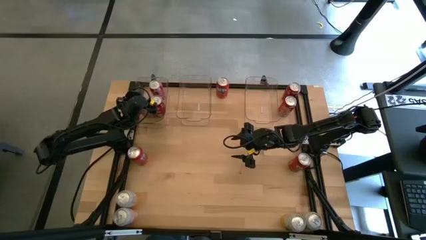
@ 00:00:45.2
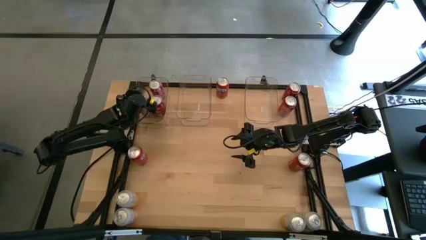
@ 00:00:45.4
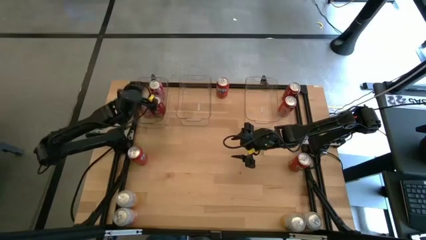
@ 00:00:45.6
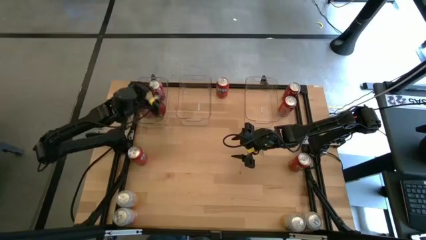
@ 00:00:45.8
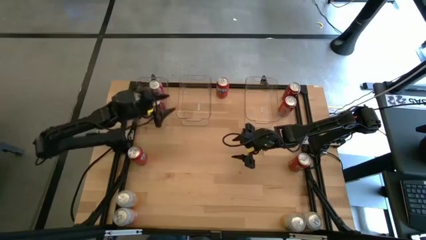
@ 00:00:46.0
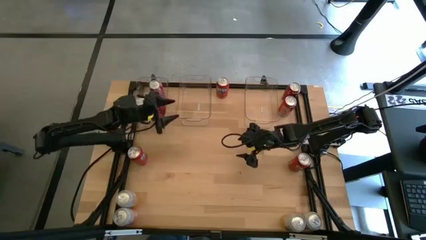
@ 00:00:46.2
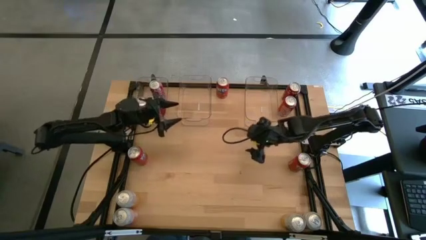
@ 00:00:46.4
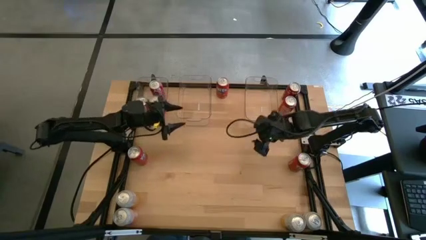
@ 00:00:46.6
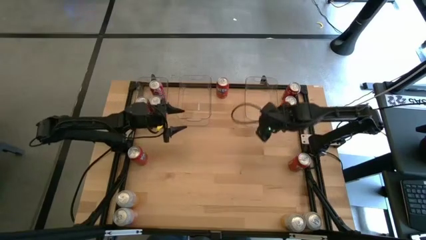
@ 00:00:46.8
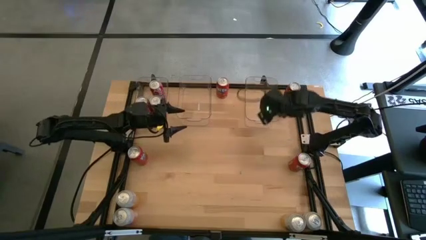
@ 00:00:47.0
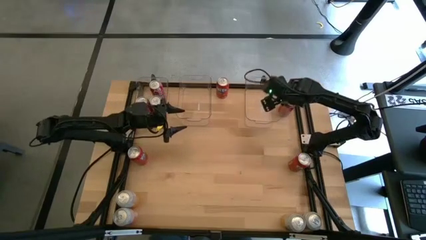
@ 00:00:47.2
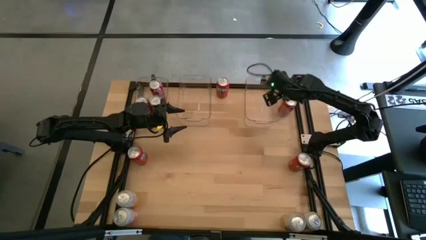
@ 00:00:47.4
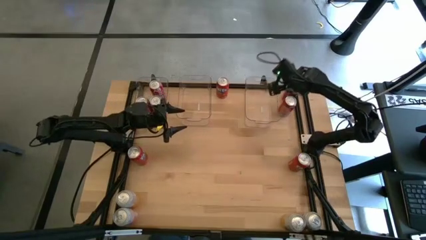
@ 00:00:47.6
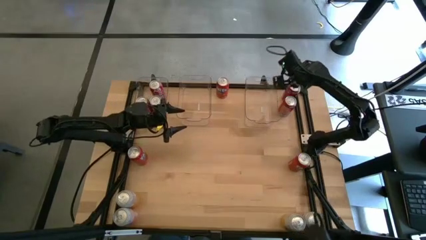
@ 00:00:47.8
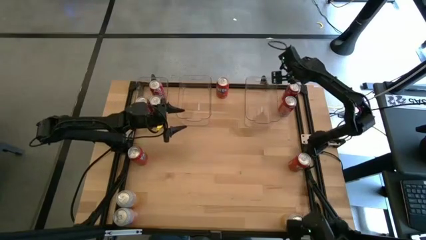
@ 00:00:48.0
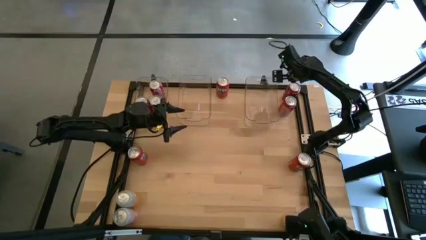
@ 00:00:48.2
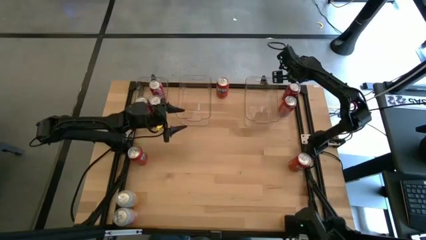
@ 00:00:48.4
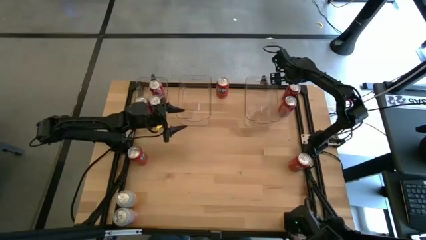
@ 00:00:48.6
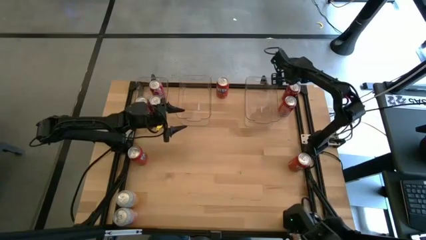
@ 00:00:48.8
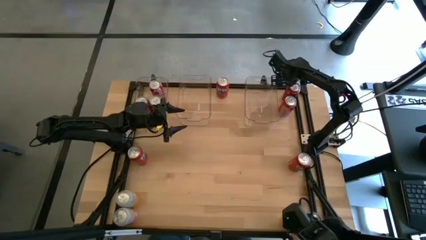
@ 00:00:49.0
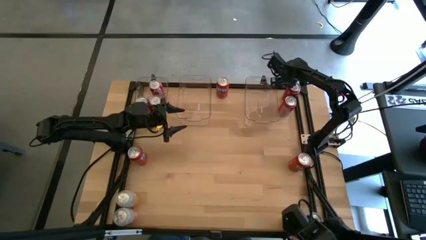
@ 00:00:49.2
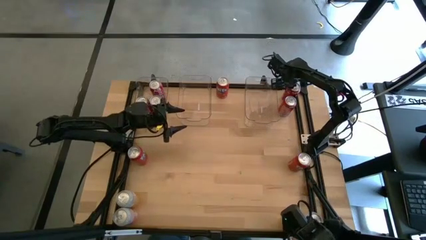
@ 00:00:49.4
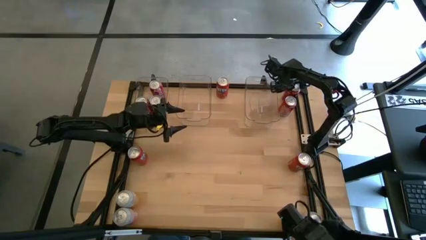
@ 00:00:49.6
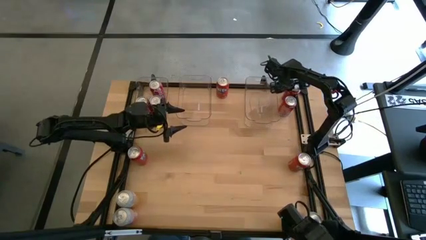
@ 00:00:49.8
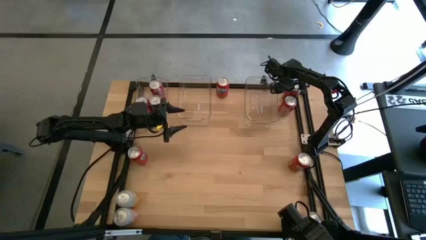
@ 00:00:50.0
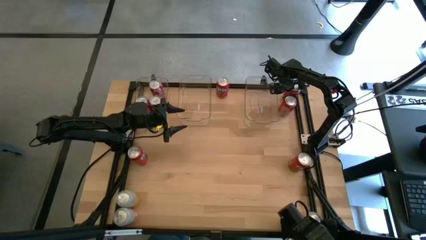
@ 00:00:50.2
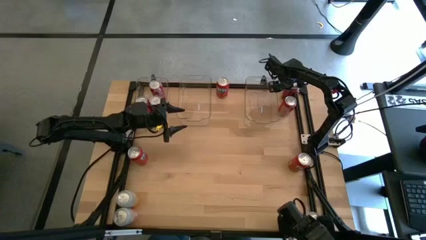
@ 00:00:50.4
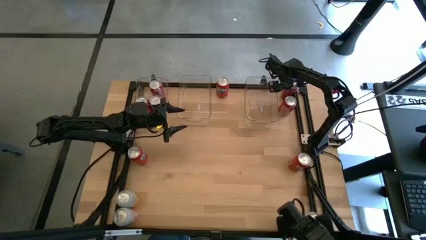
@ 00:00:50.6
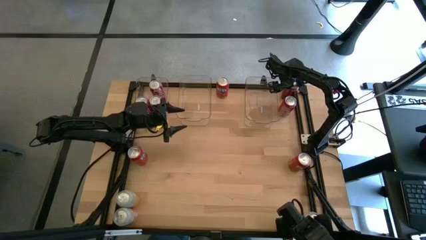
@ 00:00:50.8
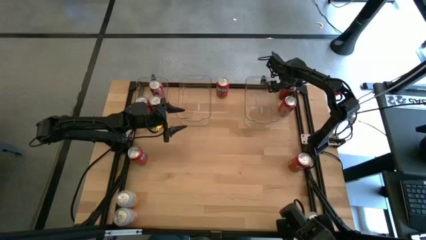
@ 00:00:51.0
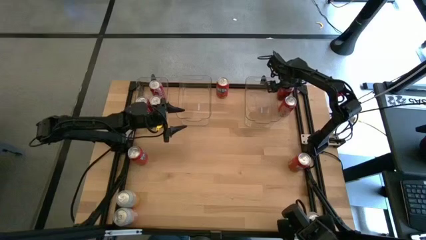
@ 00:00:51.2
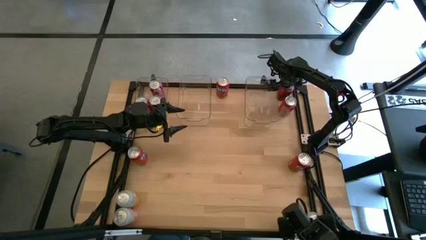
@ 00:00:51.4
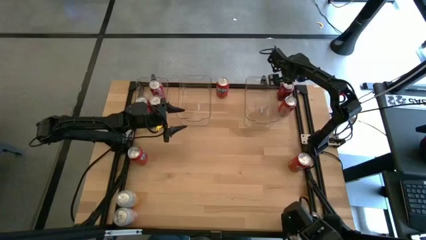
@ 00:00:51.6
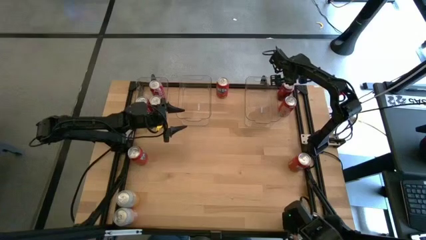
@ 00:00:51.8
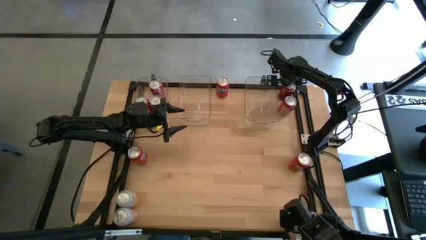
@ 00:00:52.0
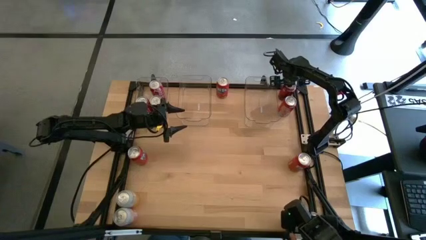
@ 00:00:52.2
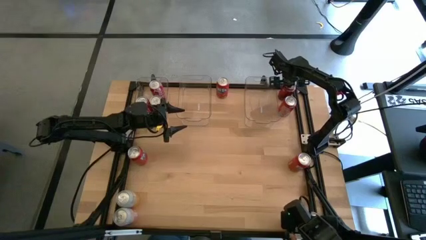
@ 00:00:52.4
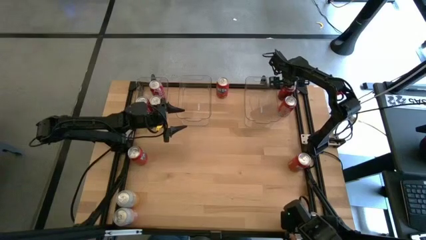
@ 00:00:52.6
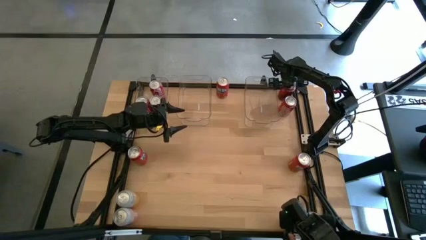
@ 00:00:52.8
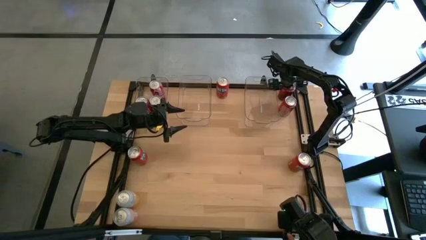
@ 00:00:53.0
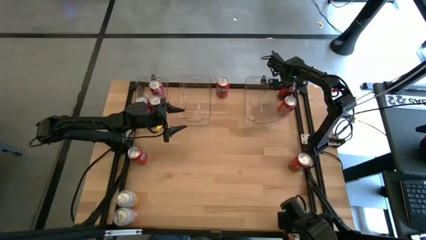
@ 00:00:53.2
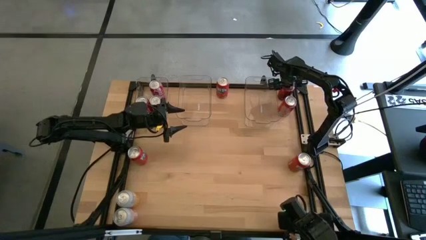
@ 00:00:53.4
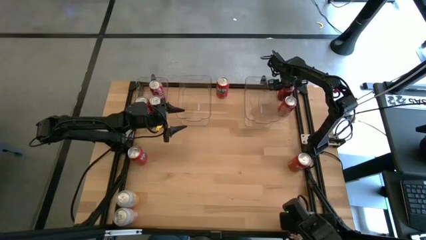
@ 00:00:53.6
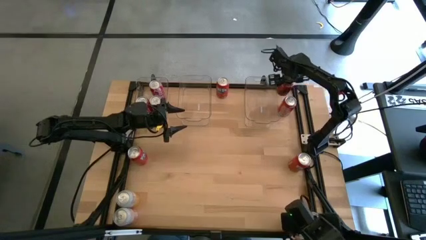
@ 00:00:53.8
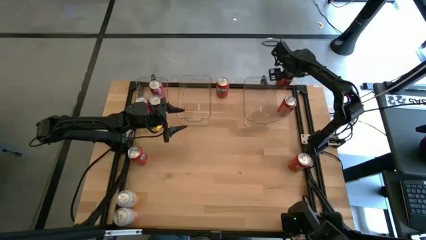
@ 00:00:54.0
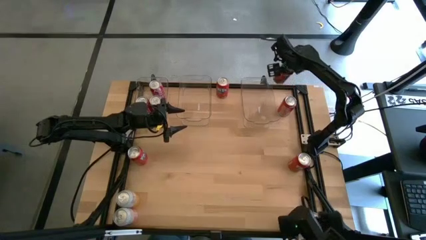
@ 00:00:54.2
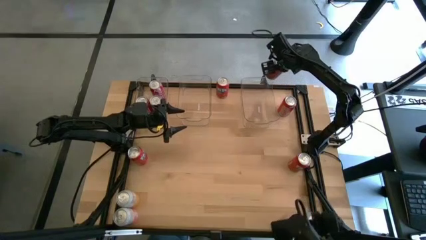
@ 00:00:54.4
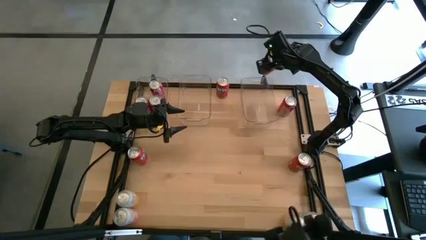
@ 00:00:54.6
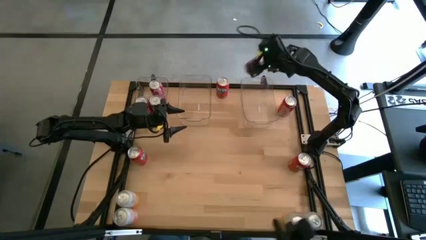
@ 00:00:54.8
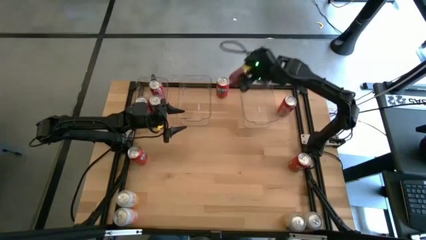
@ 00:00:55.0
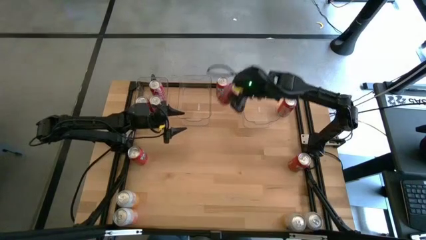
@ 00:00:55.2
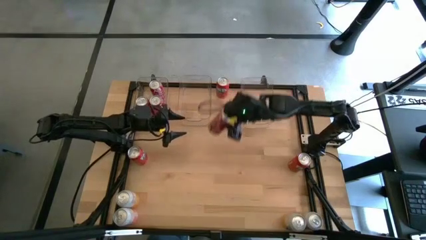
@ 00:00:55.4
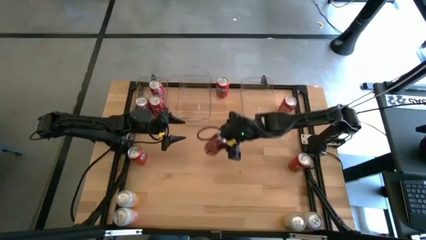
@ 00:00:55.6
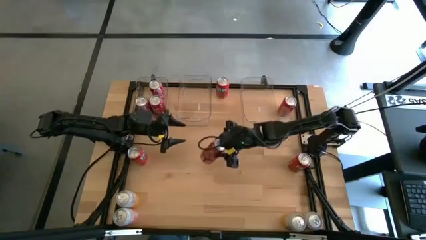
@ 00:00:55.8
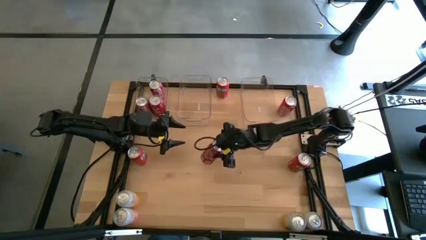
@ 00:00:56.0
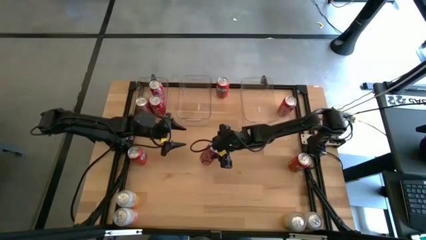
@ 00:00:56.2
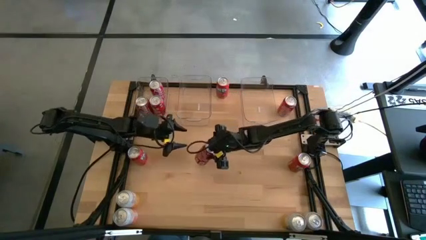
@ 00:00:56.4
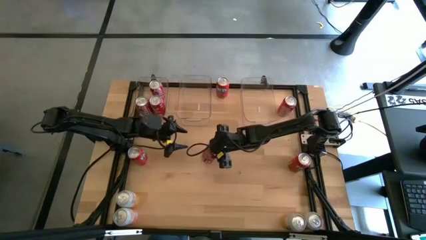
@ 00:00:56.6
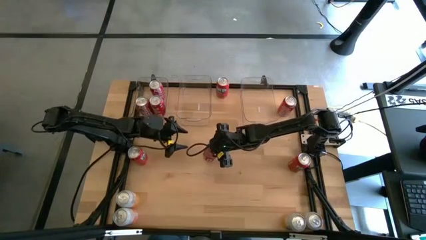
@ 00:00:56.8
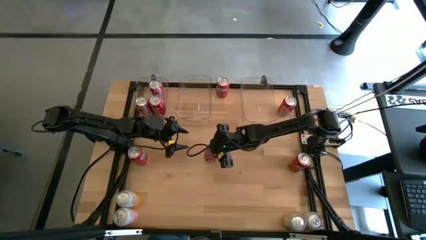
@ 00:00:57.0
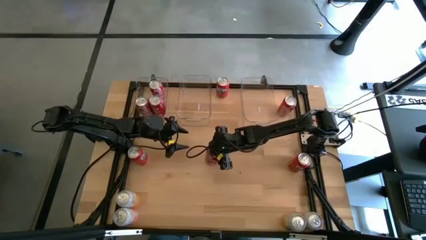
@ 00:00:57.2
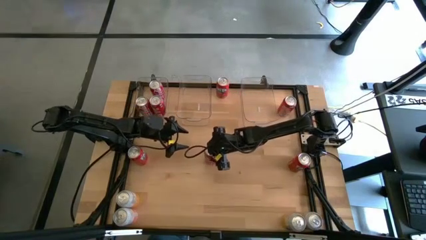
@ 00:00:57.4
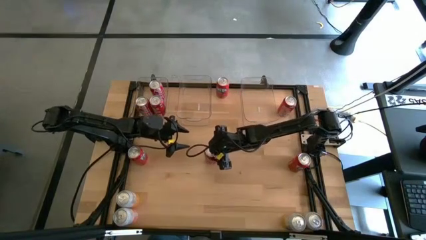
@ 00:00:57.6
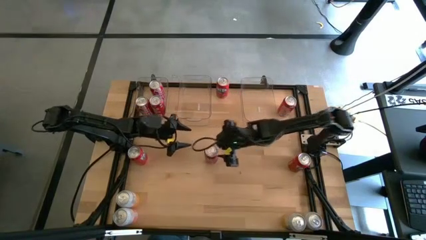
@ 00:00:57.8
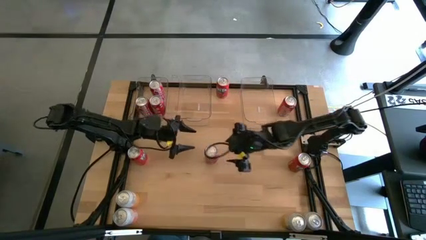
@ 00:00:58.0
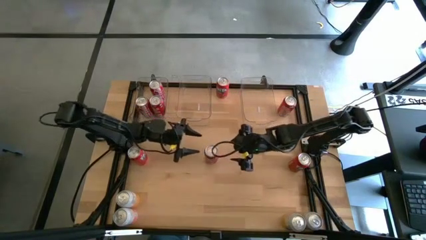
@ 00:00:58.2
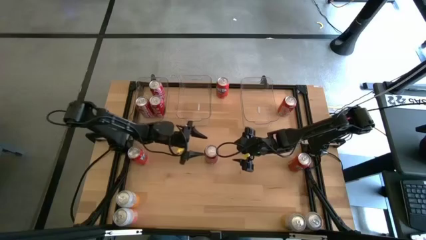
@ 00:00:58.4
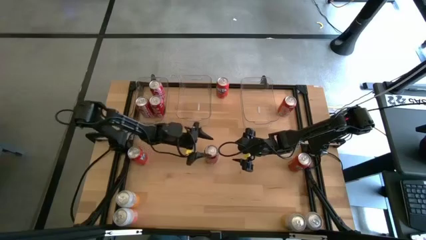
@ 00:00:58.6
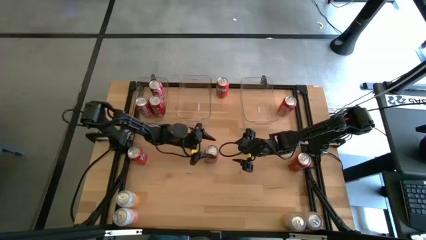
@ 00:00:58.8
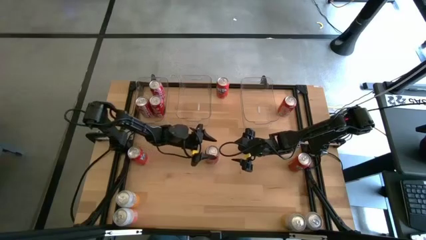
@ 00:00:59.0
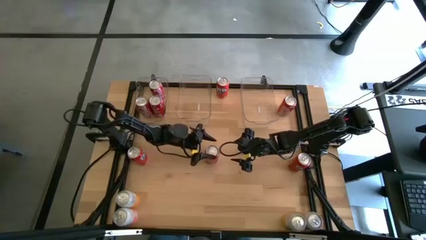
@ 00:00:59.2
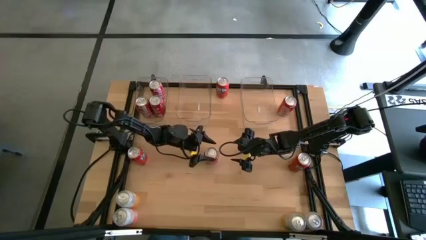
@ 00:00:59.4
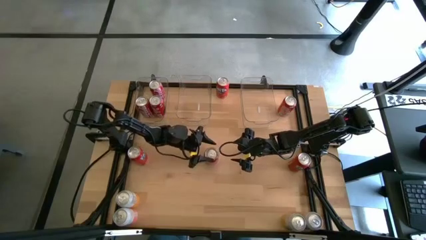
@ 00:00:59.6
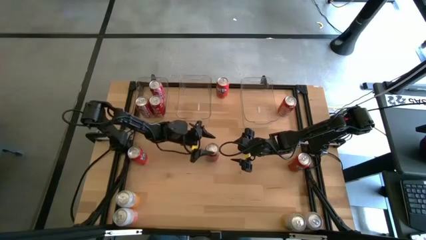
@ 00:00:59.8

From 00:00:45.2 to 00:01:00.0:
Task: Sort soda cans
Put the red soda can into the left transparent bin
